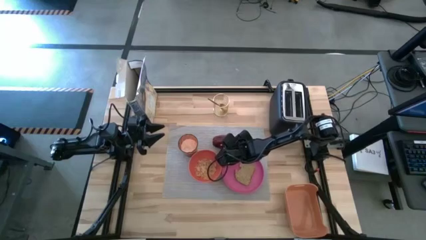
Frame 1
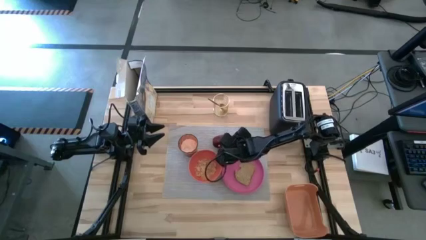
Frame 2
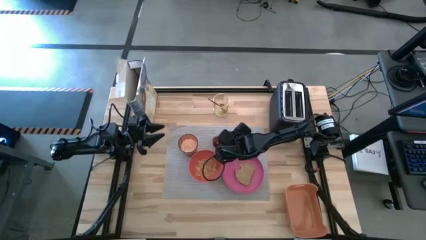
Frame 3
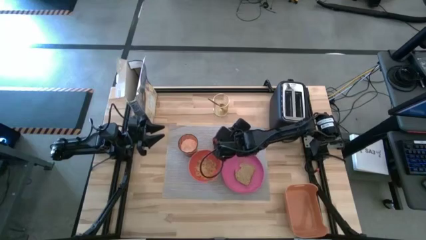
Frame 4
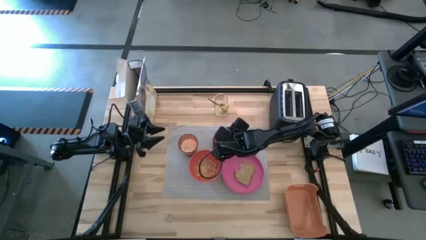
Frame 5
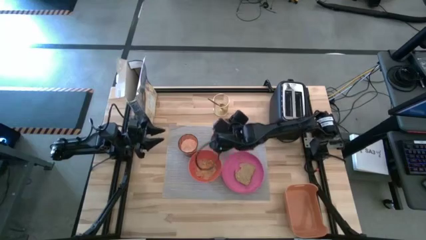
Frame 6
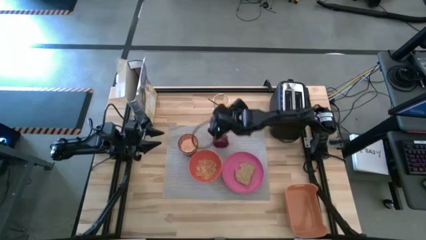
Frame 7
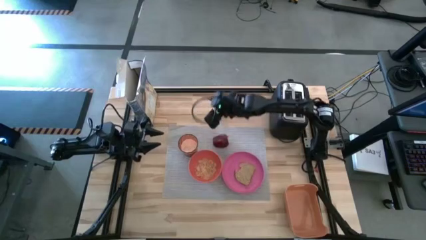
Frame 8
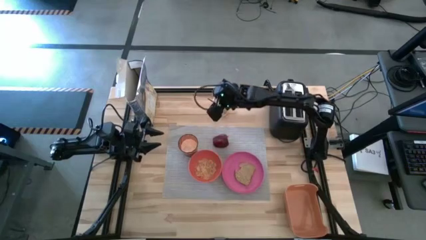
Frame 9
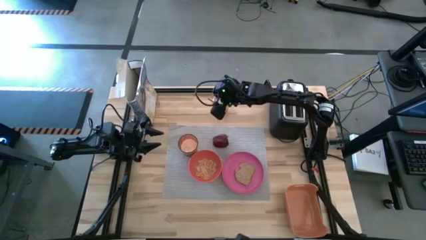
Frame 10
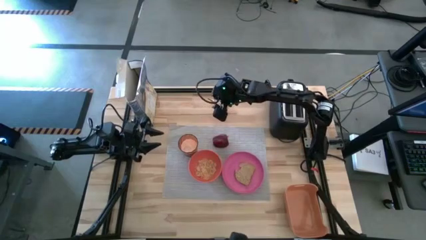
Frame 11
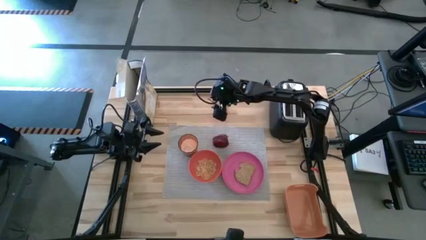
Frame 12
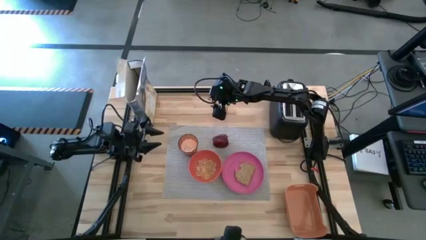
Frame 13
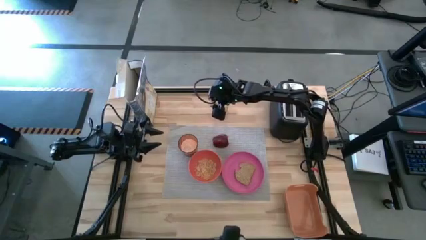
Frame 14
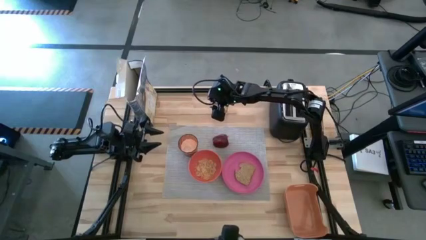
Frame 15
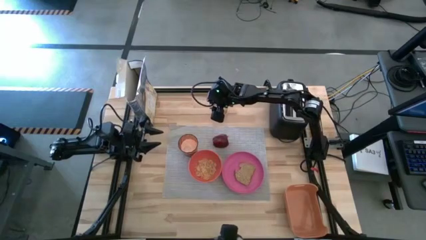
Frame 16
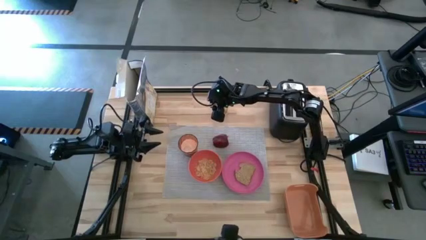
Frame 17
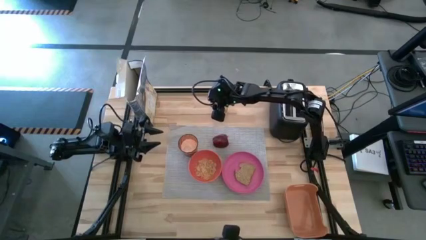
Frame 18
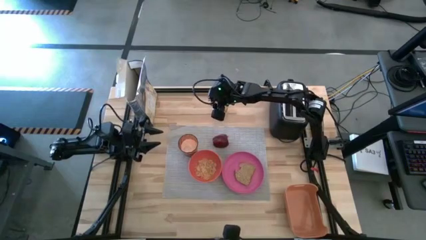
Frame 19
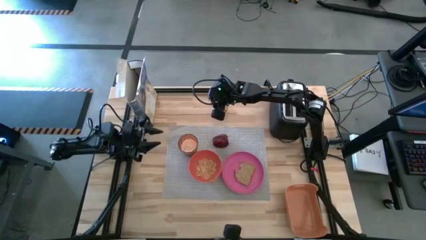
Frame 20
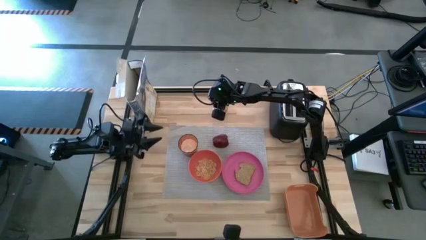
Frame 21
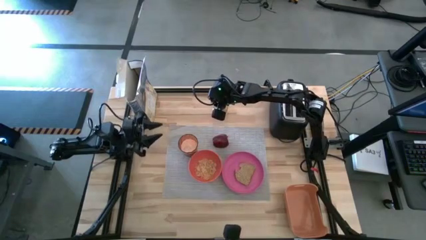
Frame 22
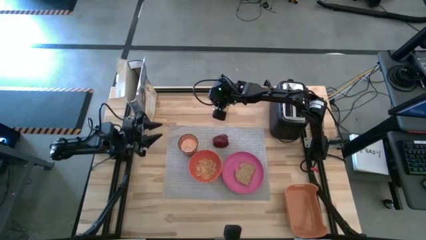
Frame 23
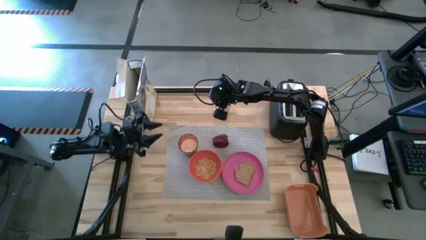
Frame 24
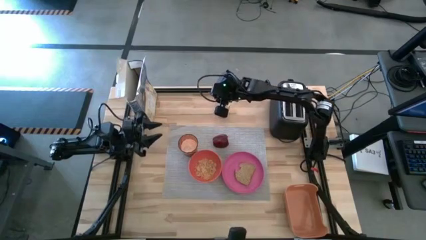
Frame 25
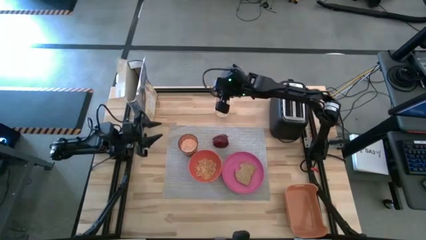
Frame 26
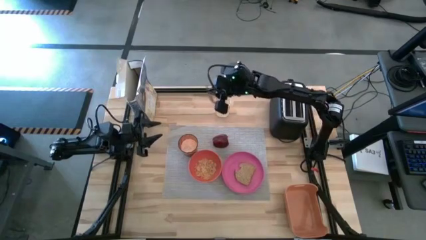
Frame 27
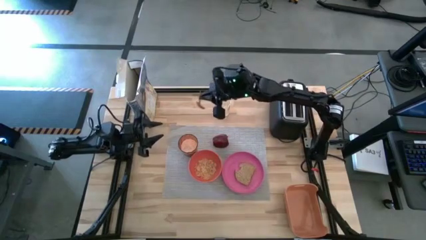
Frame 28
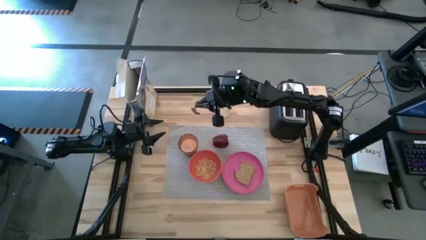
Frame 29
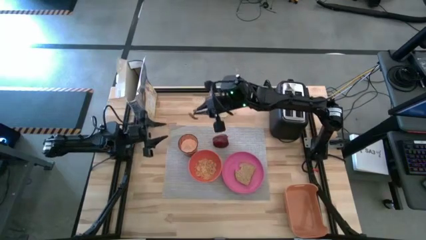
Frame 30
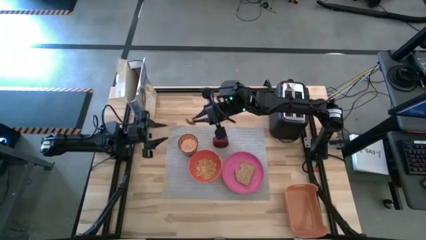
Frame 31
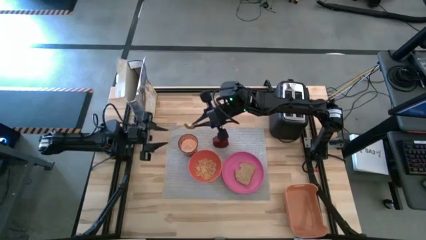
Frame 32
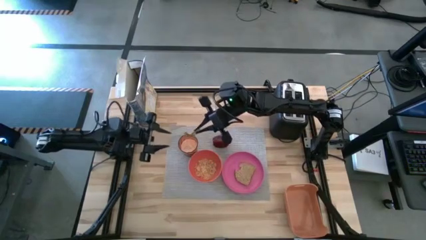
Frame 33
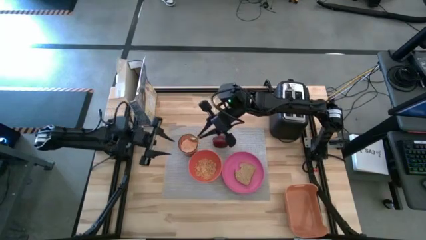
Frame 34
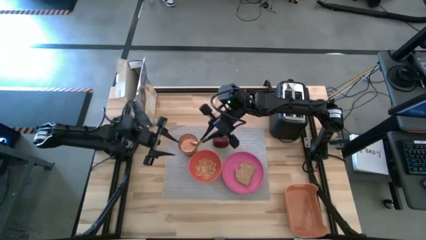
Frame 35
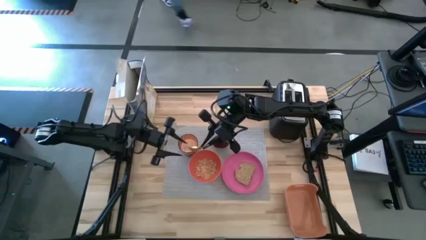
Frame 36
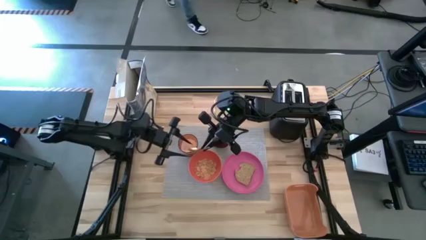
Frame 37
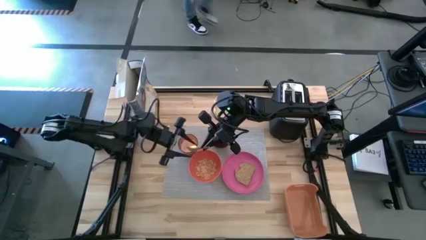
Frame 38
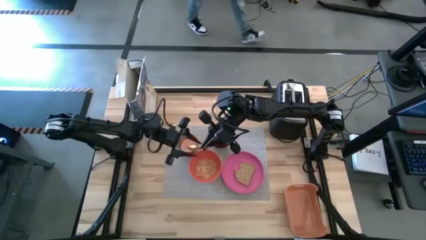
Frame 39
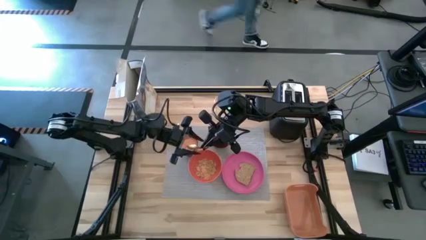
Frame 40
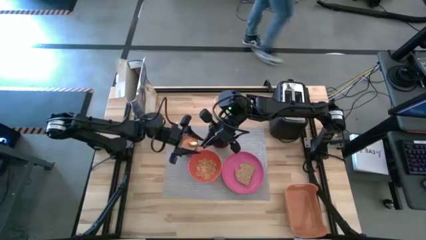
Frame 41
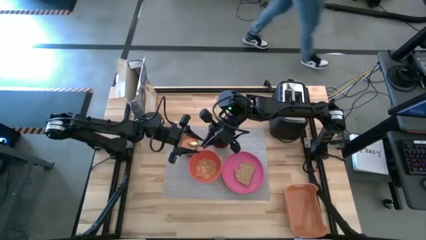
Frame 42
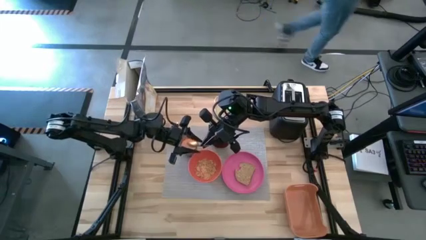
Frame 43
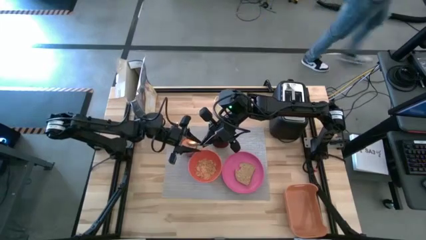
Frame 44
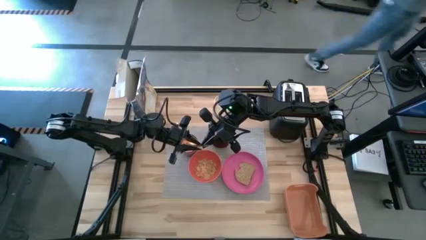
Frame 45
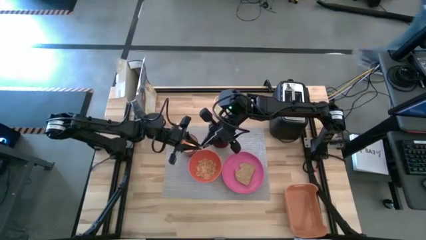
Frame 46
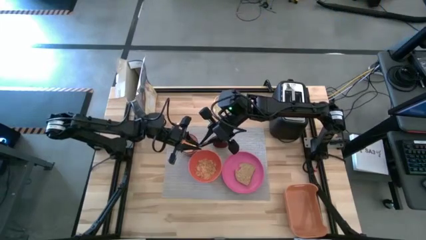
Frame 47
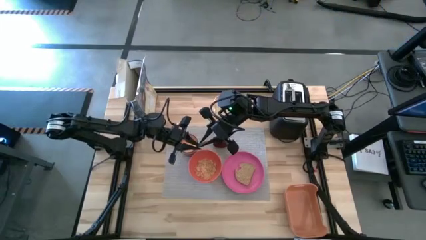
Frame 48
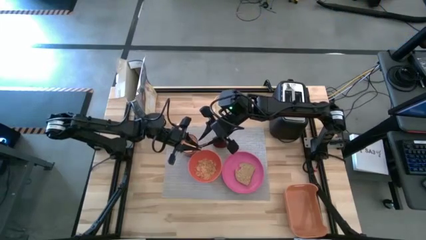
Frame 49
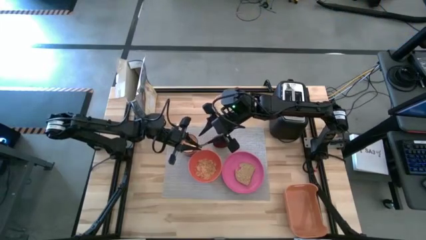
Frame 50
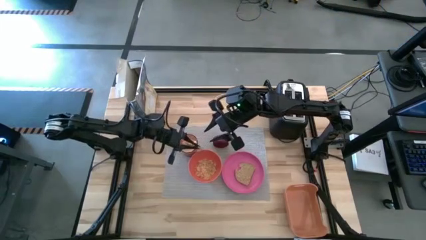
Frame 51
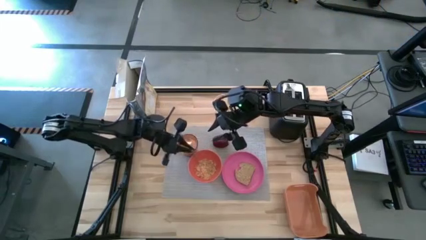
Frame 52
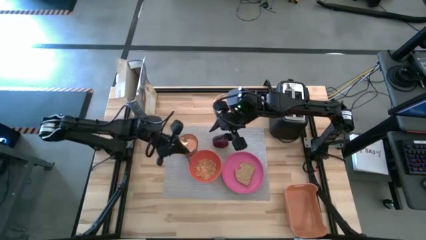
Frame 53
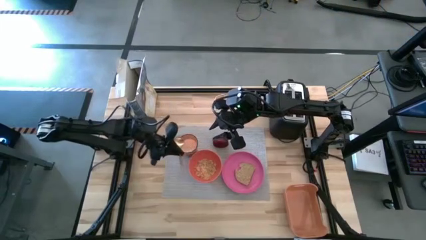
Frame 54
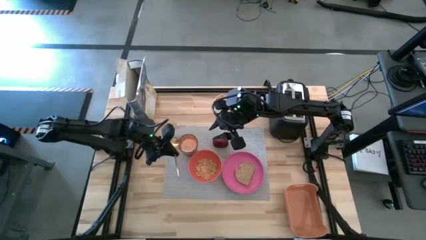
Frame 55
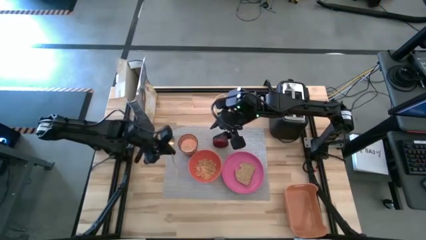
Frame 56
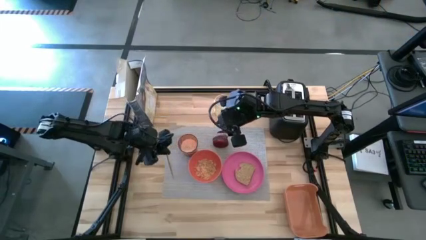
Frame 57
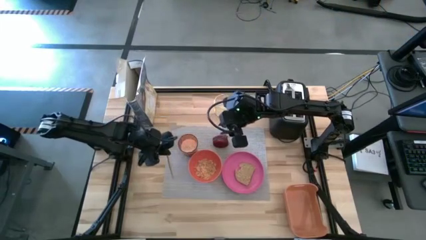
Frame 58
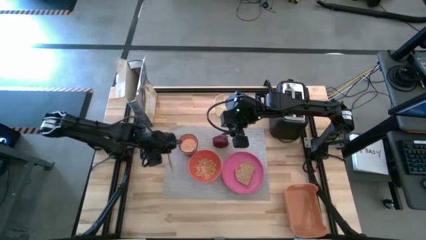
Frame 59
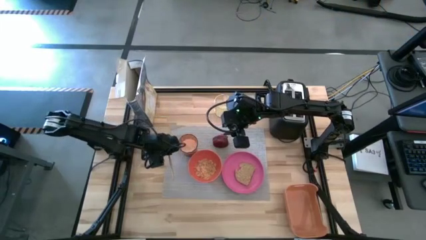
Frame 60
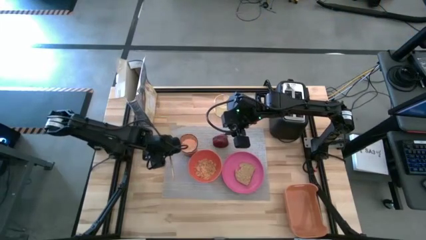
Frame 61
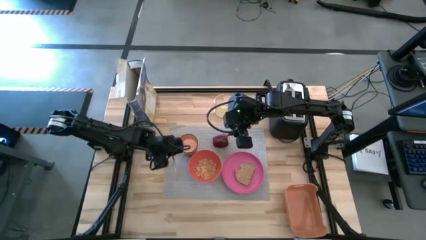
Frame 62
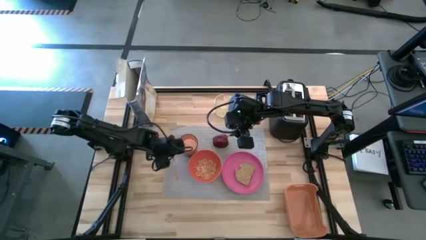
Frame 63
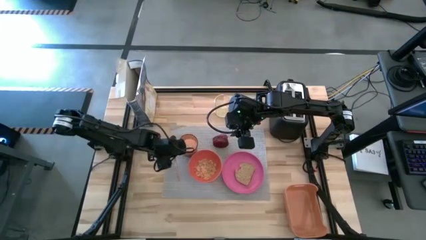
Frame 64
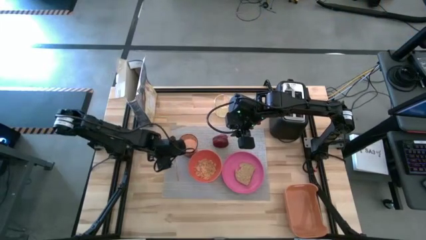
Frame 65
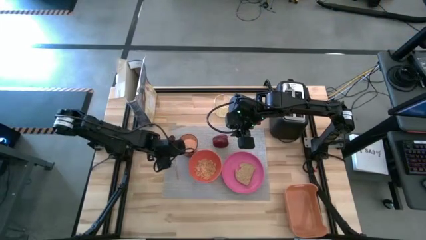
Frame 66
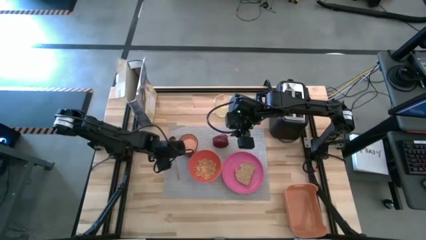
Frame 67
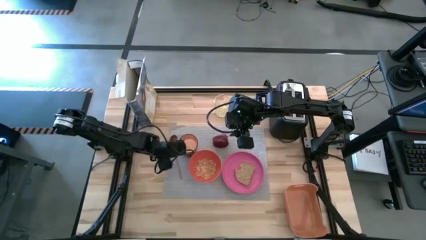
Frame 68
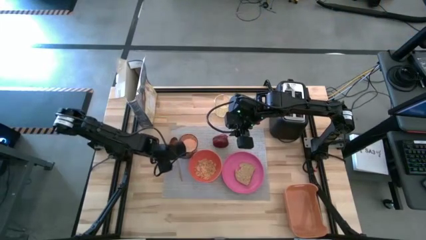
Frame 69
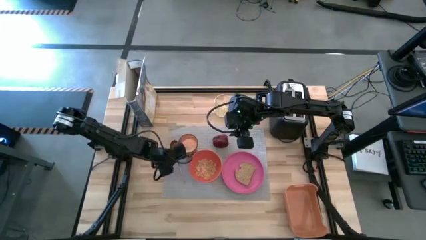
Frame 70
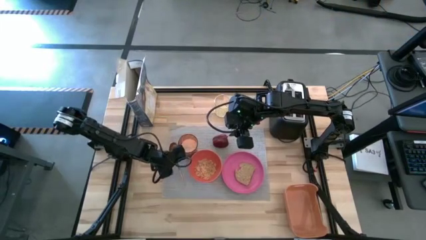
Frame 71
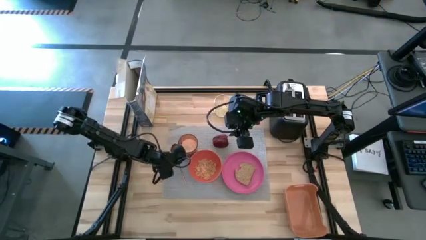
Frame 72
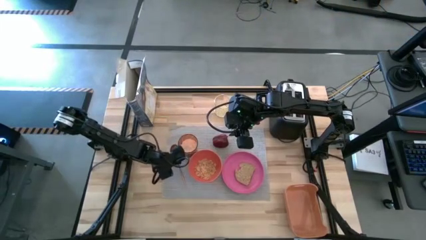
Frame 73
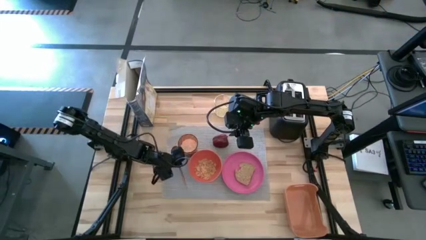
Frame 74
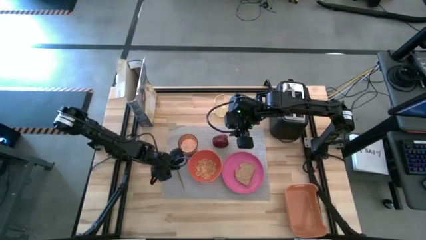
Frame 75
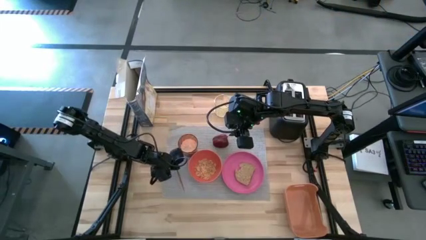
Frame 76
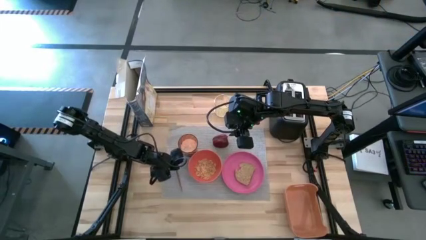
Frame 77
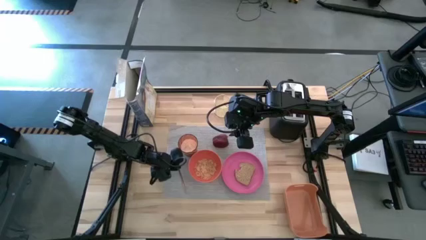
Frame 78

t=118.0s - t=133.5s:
Task: Arrange a breakfast setting
Put the gold spoon to the left of the orange bowl on the gray table mat
